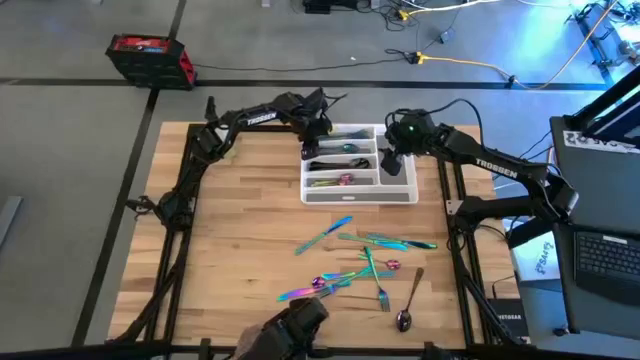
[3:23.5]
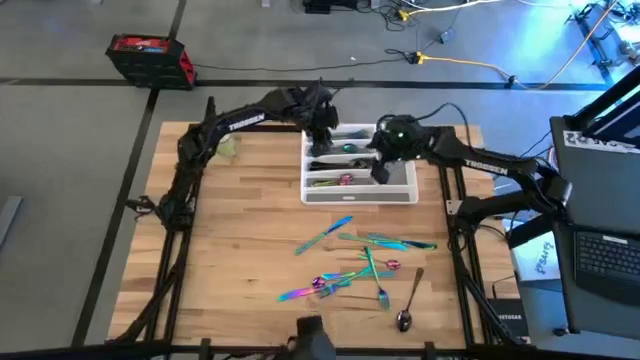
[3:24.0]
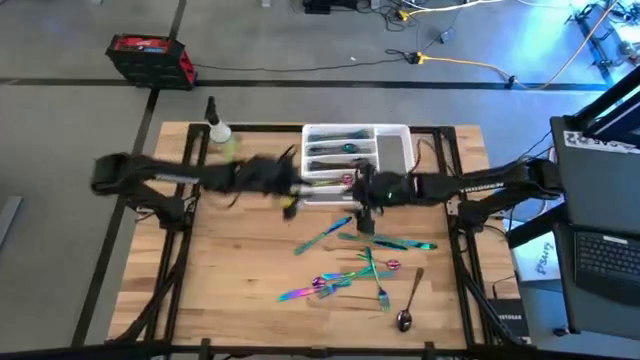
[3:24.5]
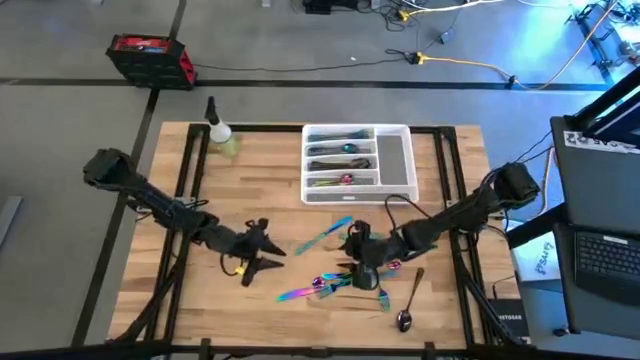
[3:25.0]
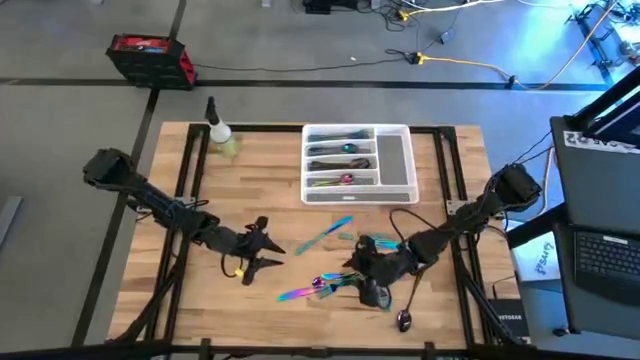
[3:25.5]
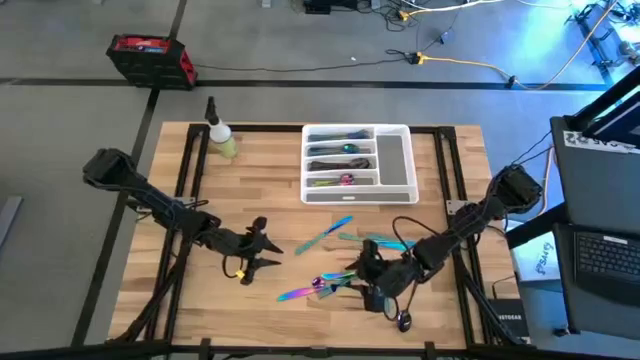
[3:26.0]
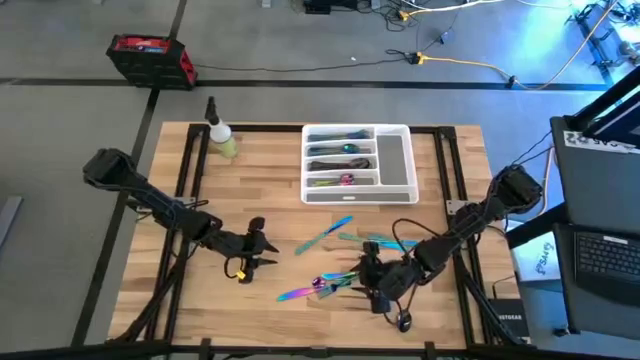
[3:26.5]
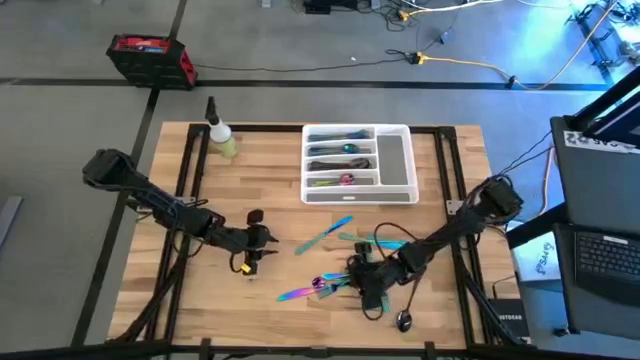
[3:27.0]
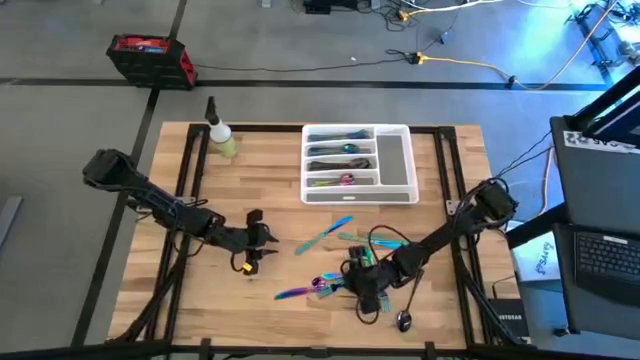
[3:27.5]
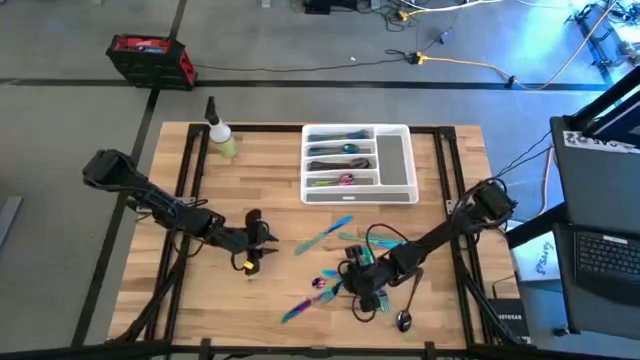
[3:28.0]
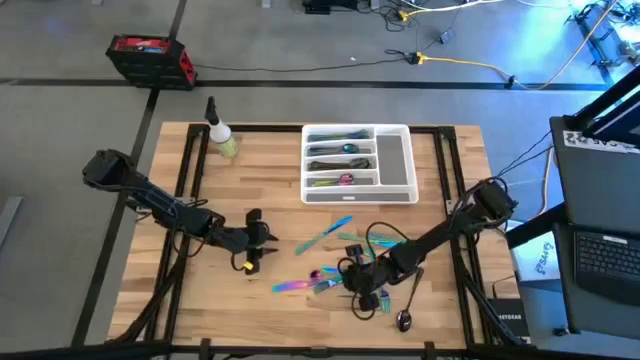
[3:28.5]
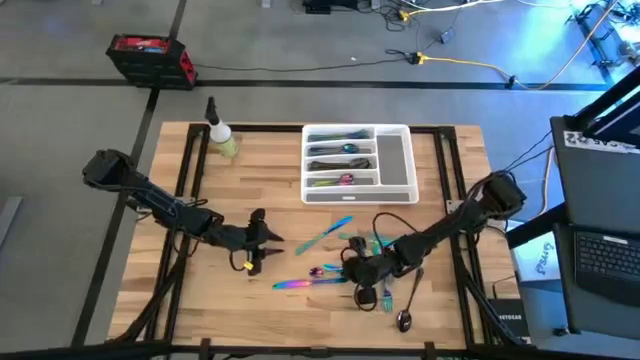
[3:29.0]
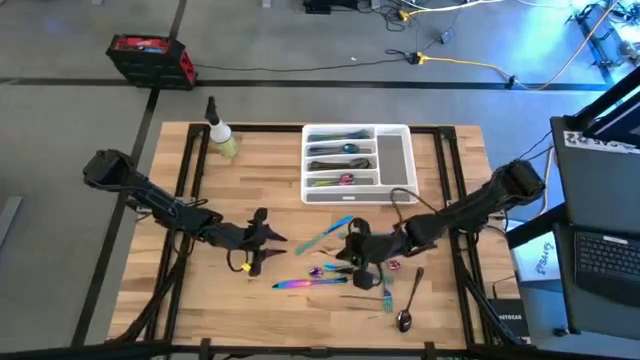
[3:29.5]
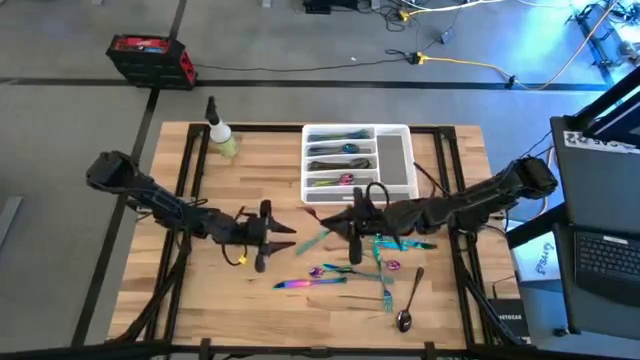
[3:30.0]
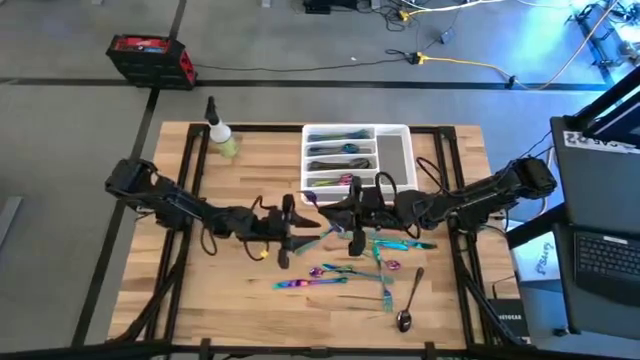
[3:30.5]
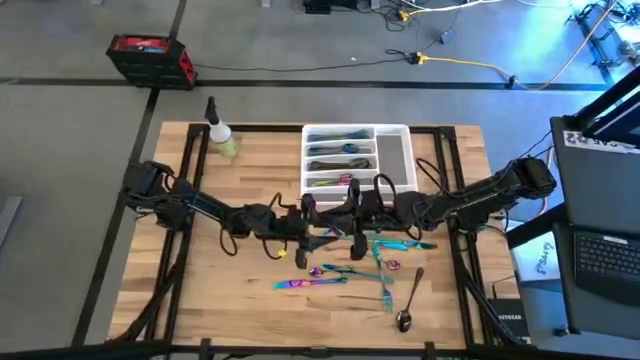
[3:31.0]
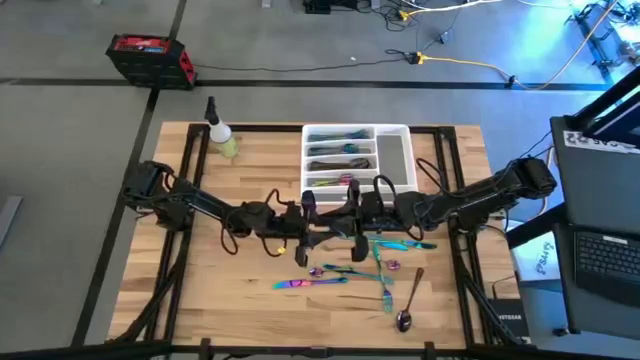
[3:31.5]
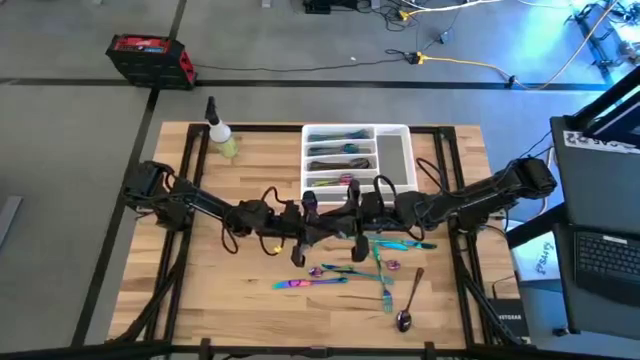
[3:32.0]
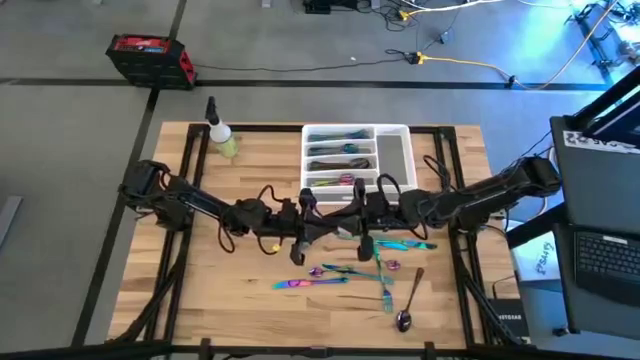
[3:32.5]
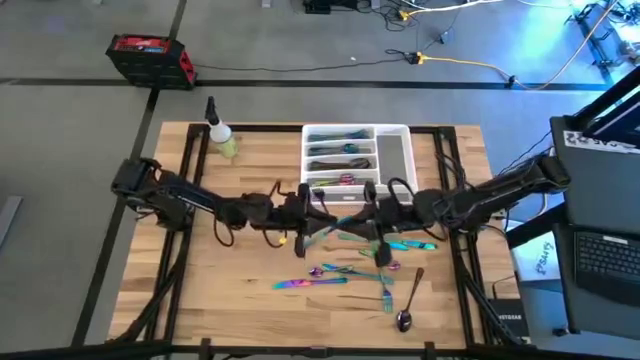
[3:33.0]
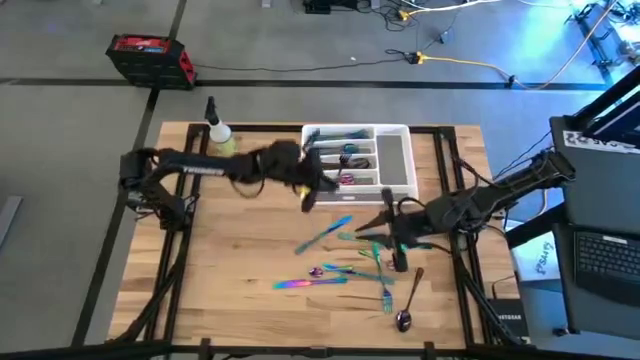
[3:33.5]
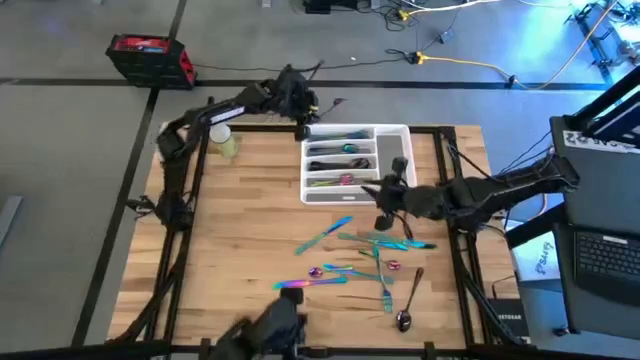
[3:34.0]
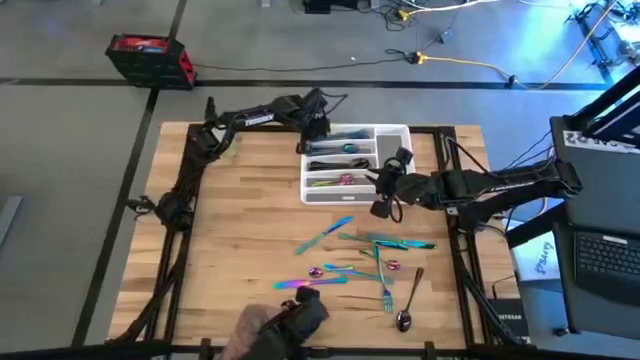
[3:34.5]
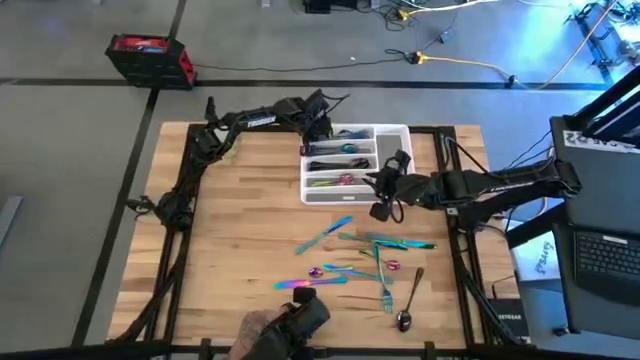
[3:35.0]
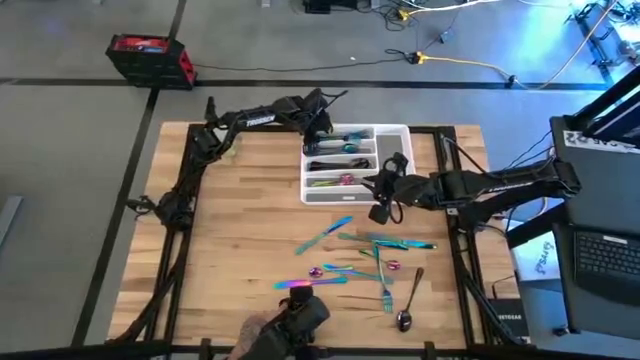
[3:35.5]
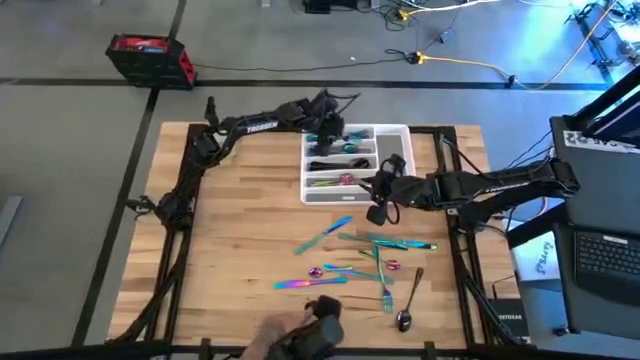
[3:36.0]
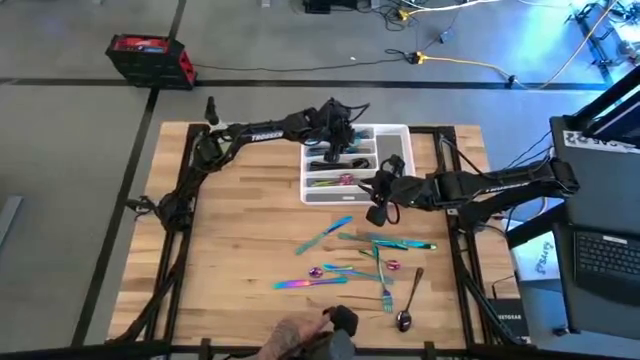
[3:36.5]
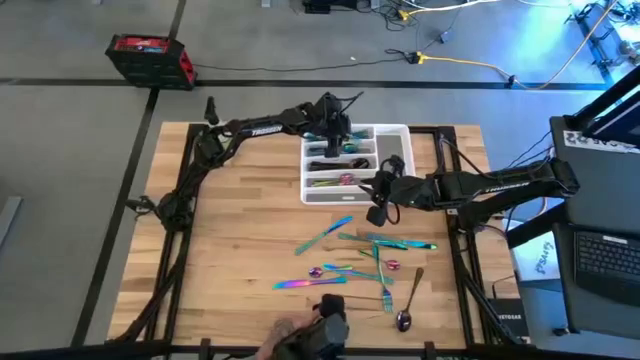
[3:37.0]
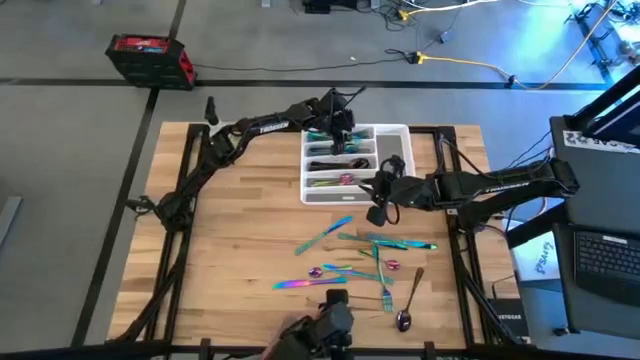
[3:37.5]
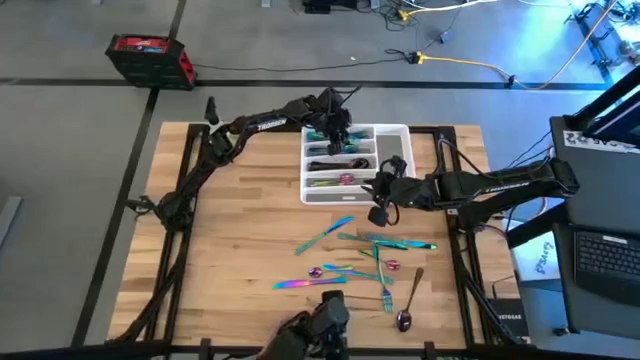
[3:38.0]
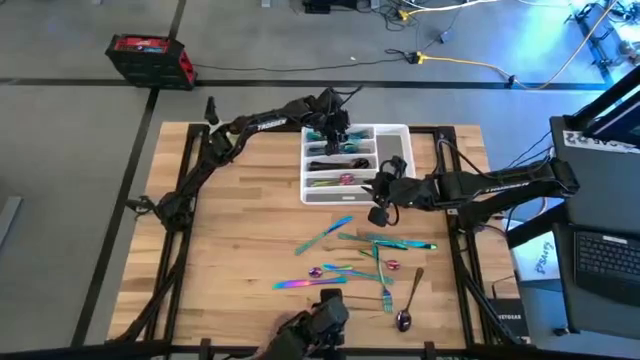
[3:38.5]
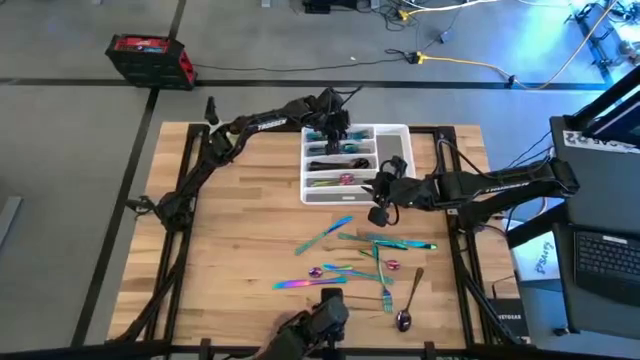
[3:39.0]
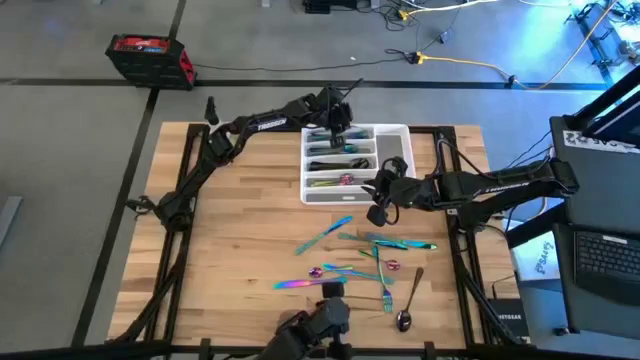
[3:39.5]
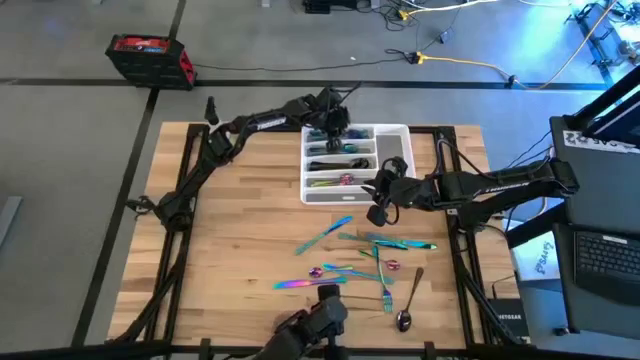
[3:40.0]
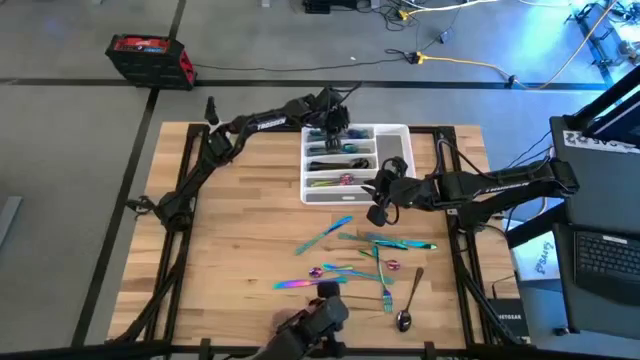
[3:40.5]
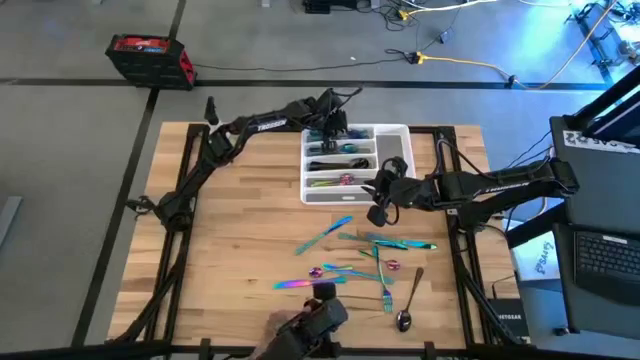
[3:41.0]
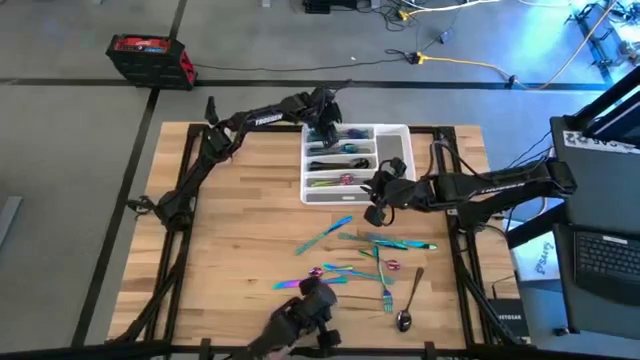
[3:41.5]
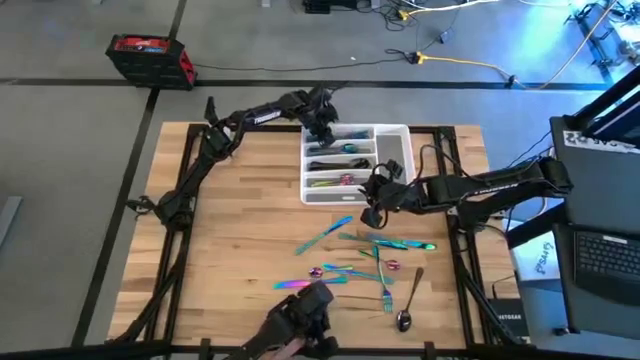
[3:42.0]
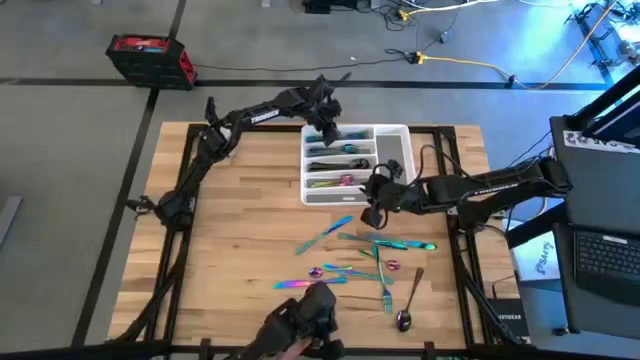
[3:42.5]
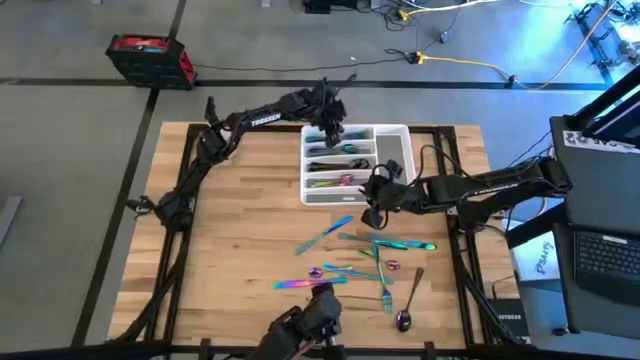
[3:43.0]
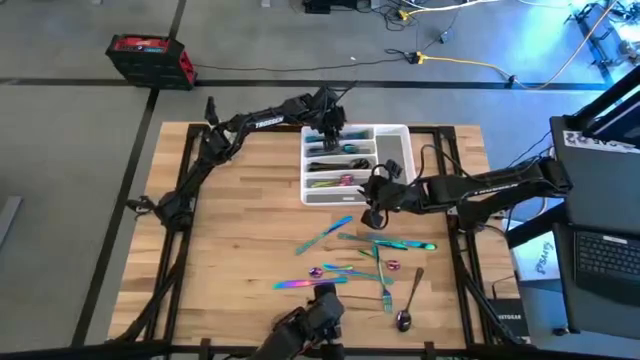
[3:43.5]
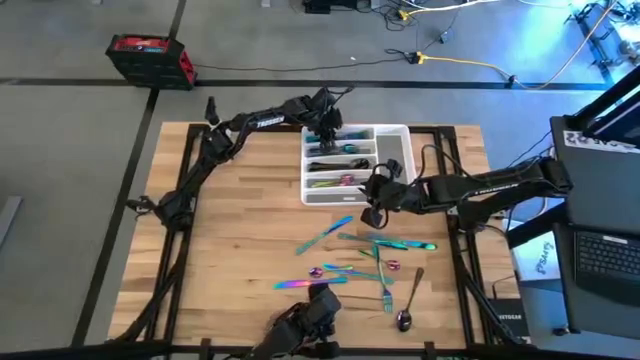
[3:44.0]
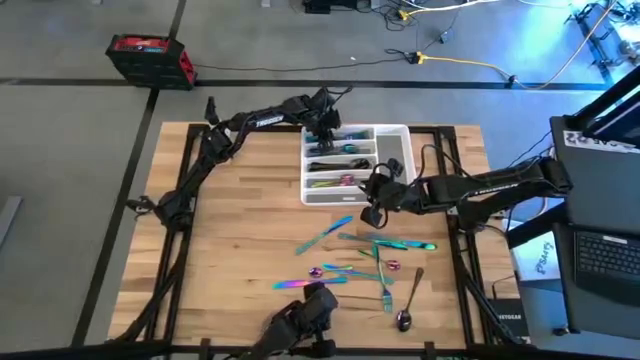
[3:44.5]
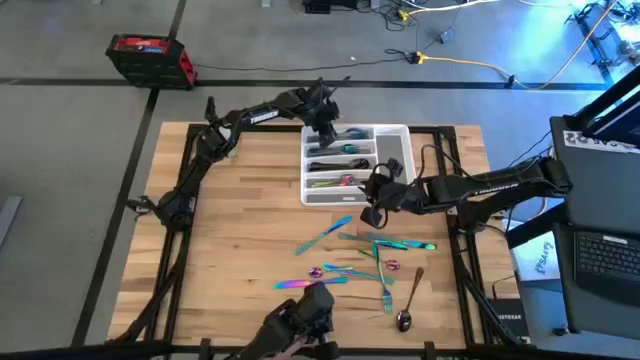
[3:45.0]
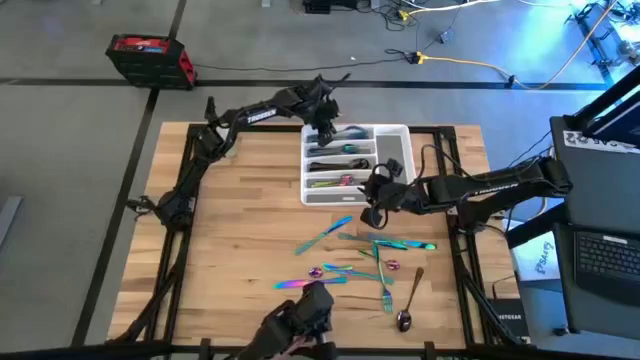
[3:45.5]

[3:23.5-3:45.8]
Task: Sort silverware
Put the blue fork on the white silverware tray
